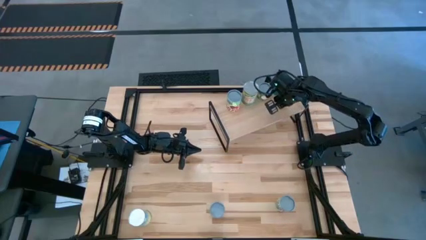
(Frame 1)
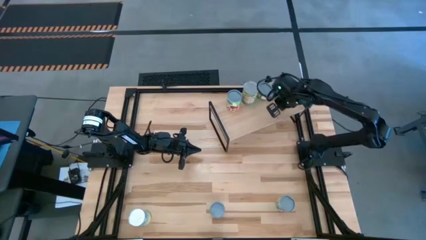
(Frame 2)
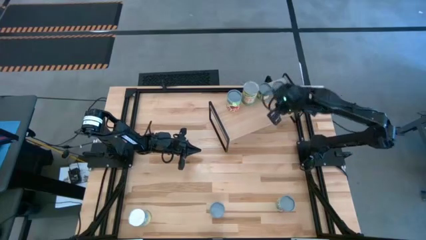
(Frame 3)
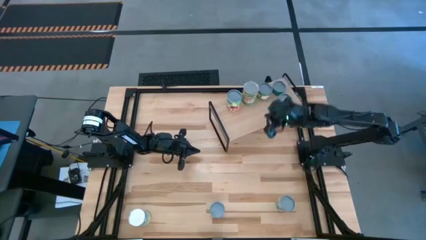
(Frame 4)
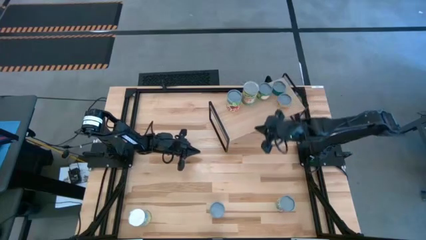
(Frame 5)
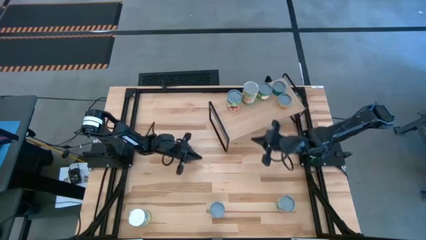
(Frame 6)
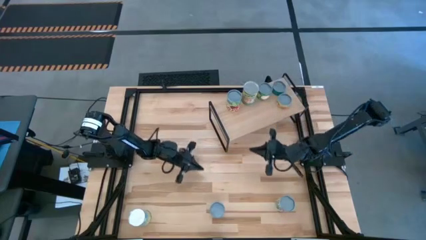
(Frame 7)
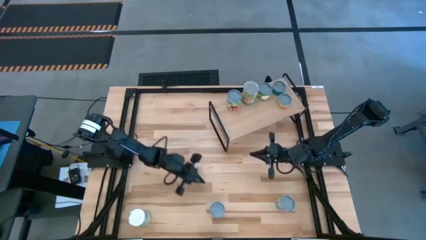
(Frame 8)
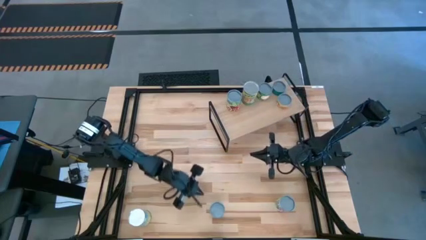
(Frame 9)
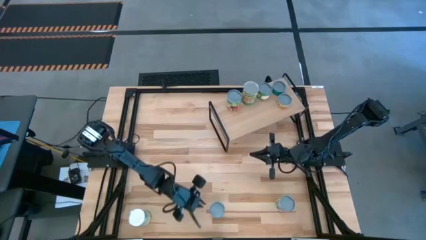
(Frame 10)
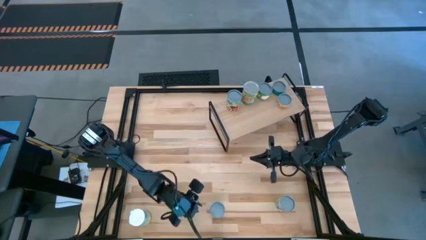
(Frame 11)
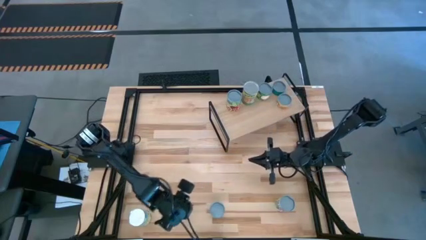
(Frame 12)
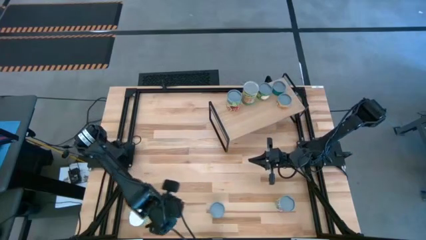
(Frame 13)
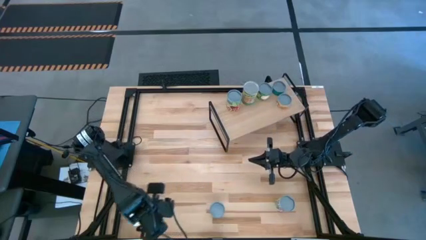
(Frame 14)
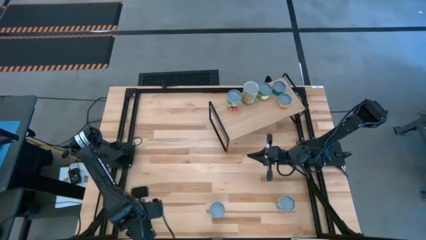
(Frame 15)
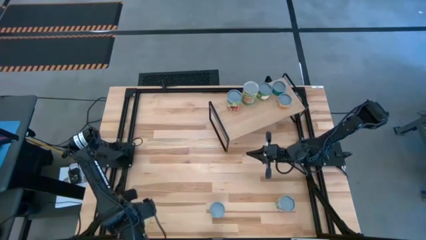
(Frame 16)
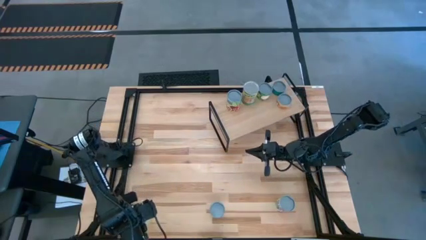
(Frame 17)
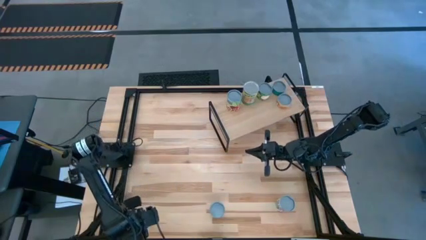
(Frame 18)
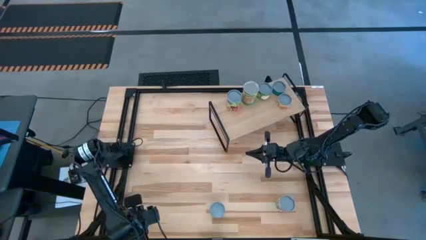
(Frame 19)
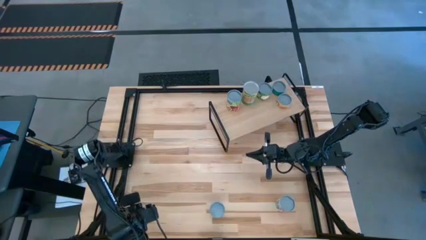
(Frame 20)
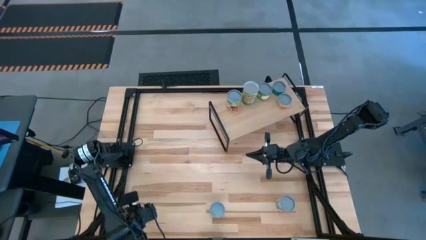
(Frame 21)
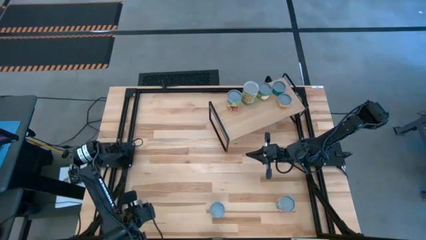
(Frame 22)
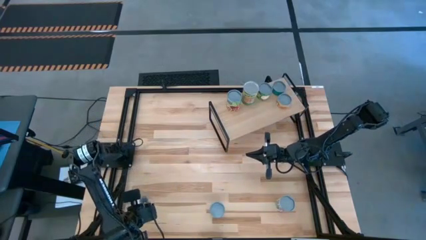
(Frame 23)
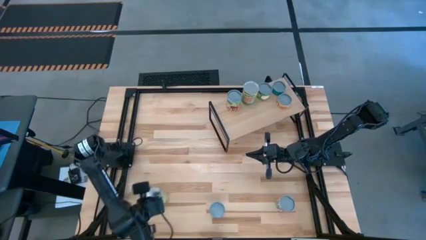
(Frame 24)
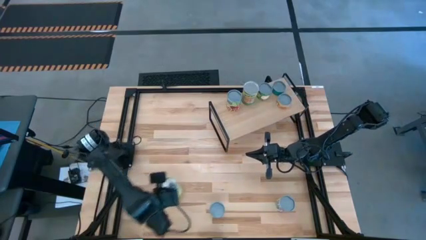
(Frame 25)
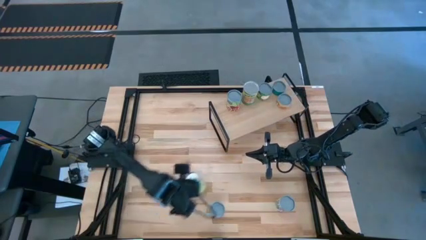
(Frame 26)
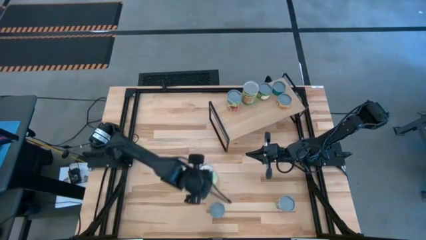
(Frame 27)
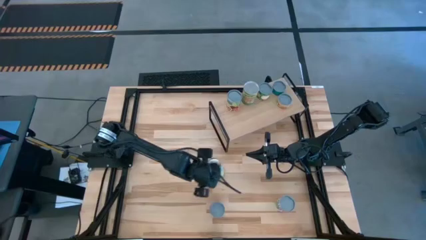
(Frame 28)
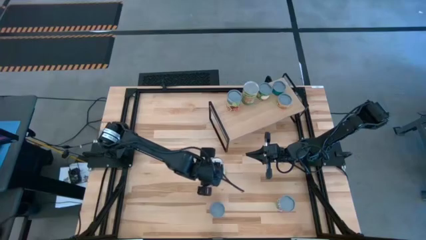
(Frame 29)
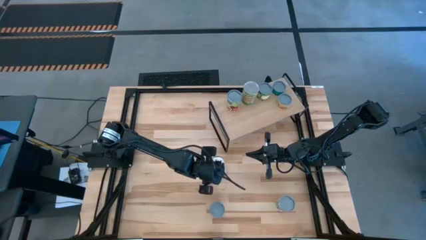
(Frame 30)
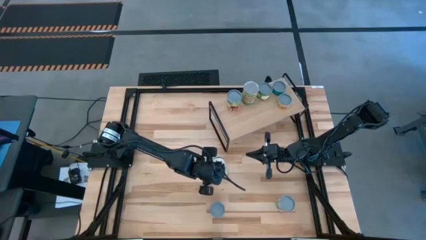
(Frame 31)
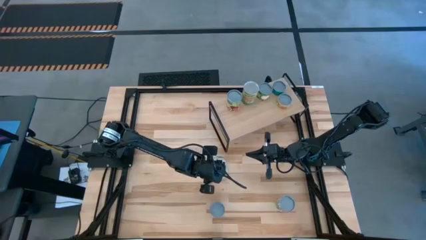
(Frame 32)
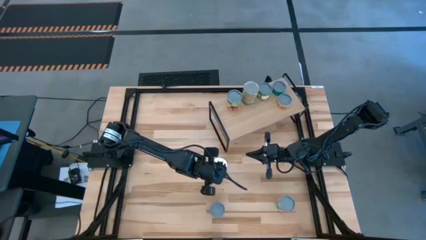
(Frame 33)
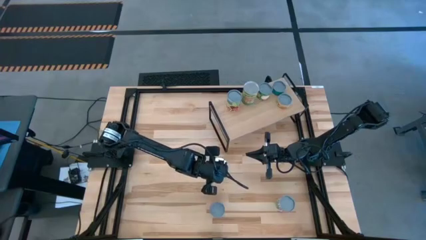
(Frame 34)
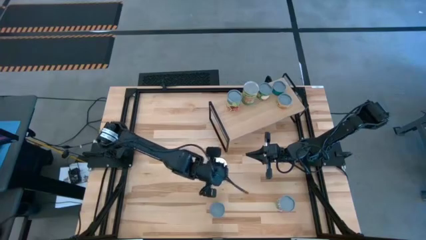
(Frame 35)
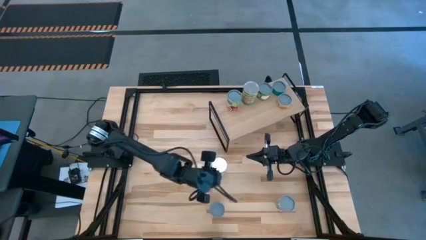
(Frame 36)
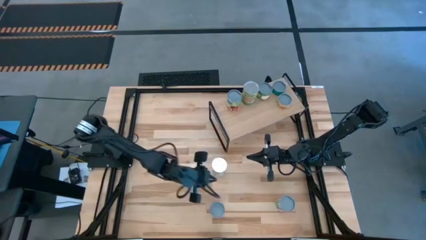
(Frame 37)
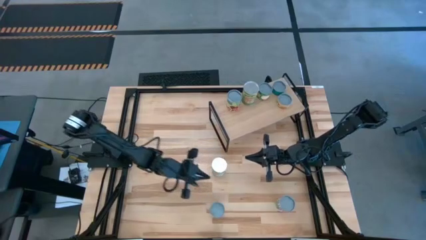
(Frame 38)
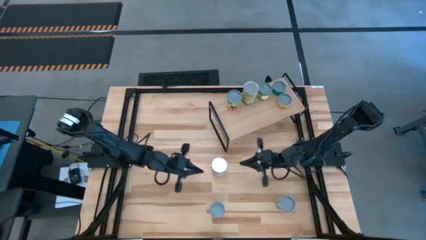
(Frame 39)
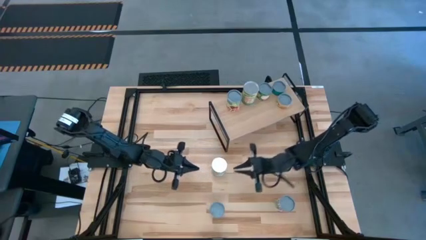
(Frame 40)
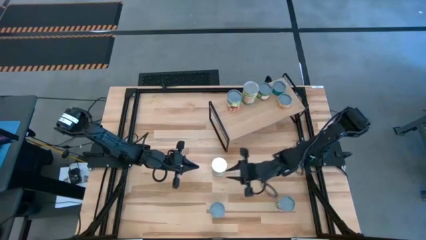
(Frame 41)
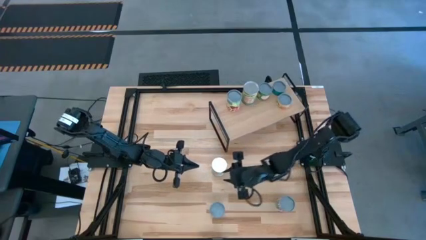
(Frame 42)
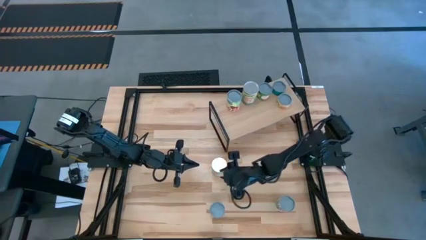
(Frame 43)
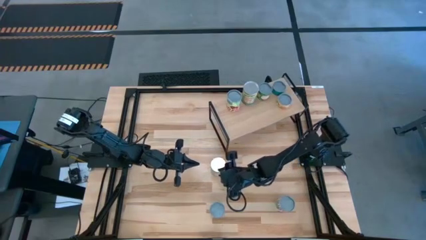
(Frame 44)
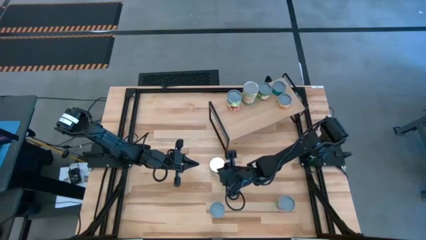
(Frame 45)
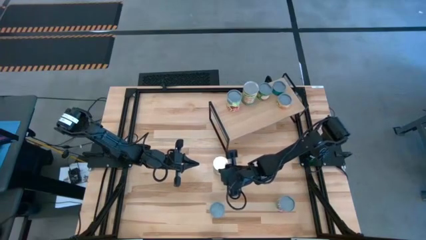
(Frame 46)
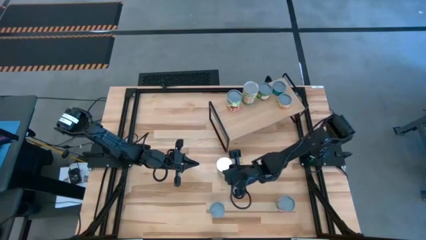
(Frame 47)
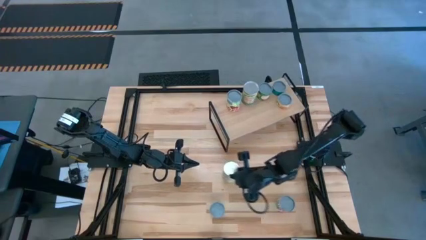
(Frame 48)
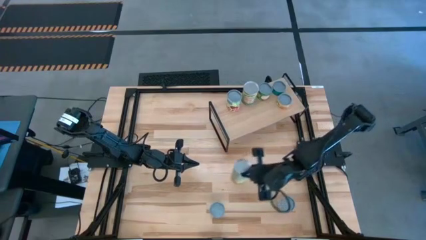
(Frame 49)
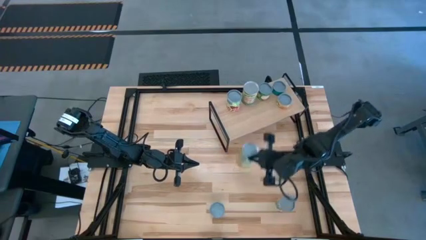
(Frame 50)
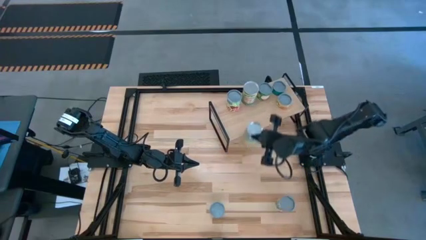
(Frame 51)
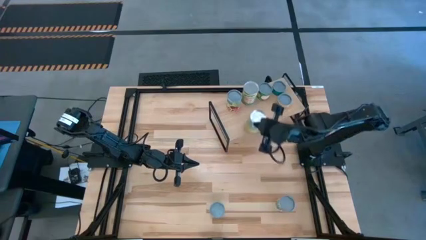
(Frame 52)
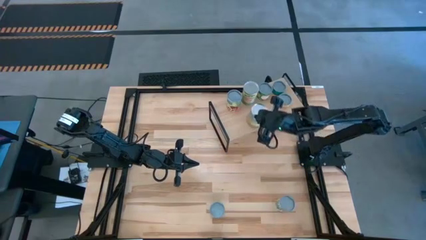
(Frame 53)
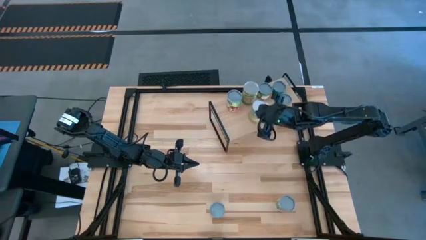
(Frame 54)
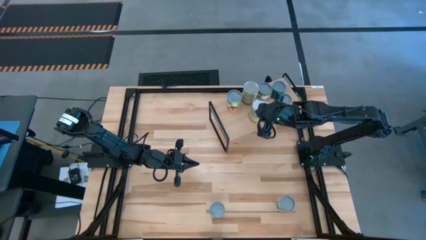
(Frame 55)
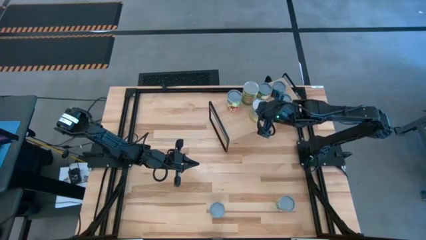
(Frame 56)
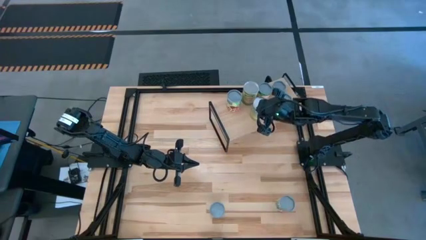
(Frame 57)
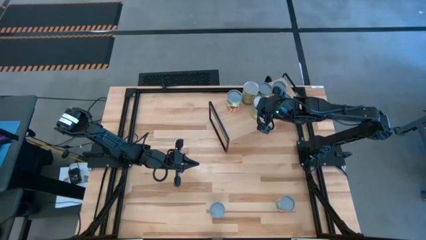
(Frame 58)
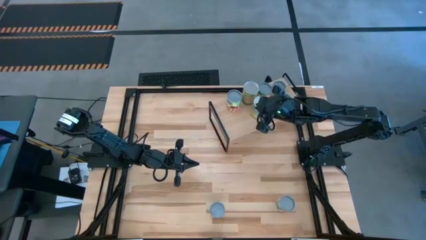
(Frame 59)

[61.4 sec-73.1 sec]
Task: Pick and place cans onto a shelf
Put the canned carrots on the shelf
